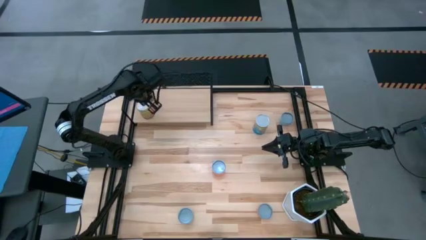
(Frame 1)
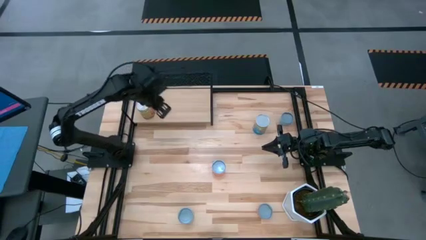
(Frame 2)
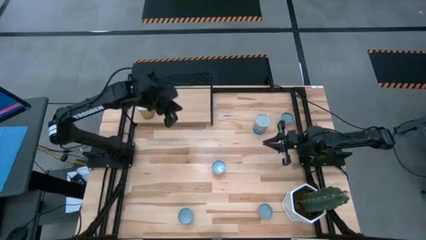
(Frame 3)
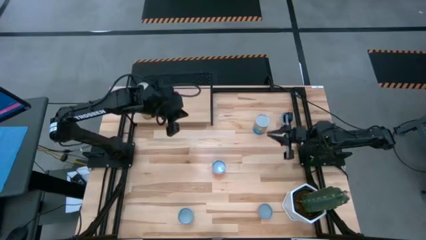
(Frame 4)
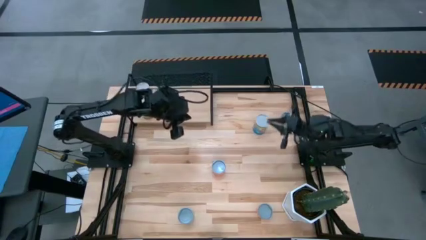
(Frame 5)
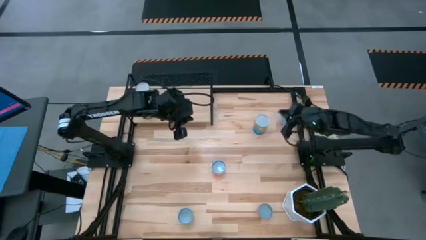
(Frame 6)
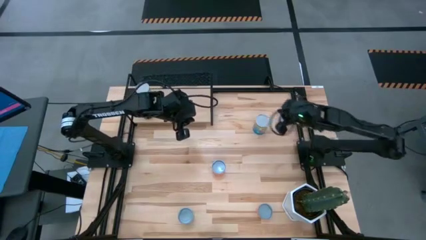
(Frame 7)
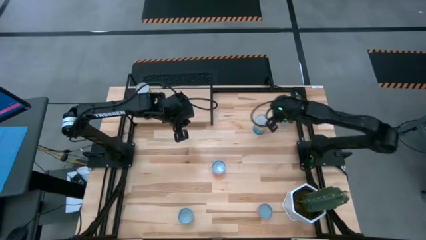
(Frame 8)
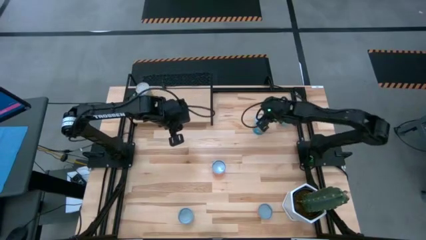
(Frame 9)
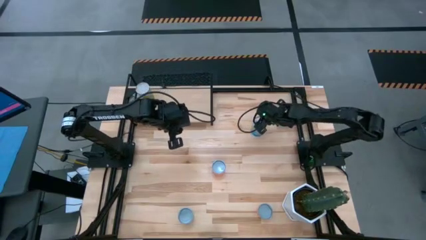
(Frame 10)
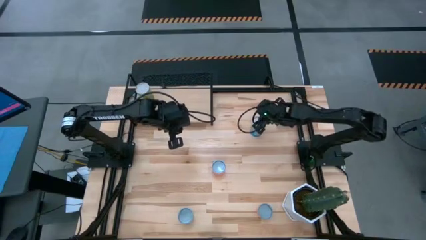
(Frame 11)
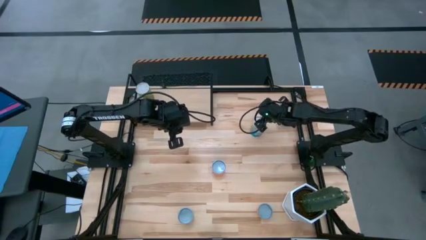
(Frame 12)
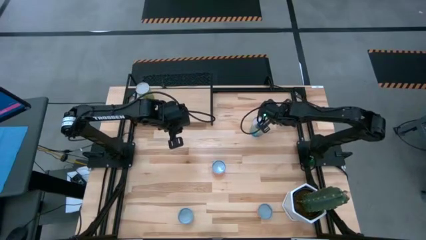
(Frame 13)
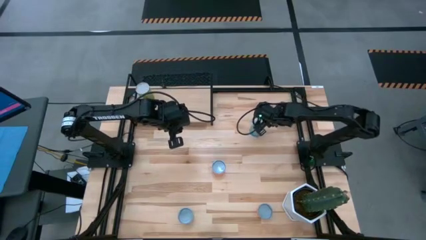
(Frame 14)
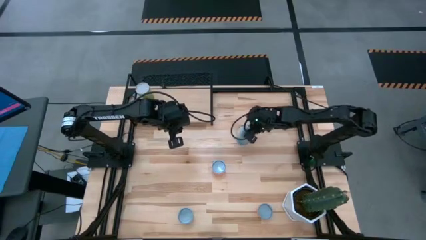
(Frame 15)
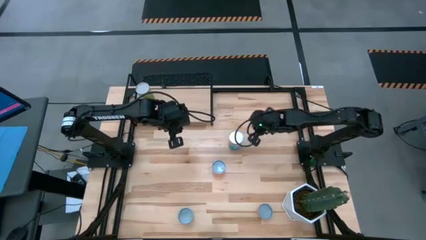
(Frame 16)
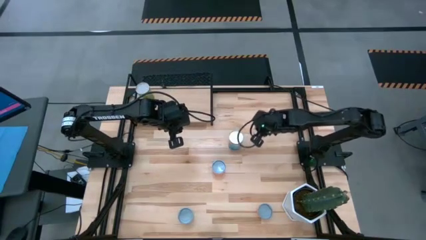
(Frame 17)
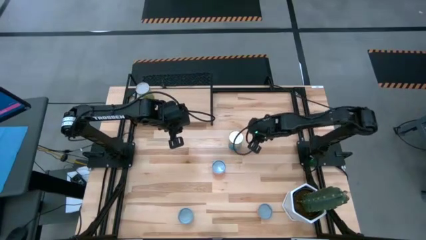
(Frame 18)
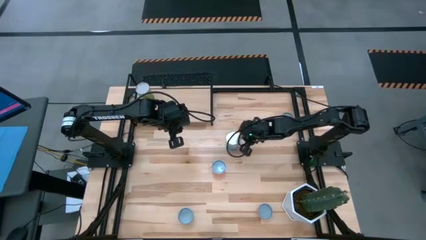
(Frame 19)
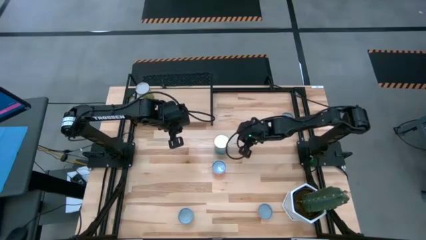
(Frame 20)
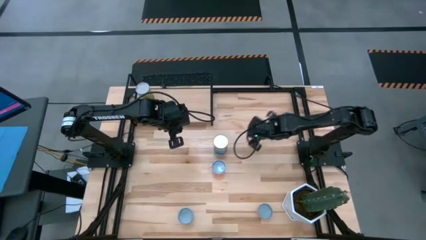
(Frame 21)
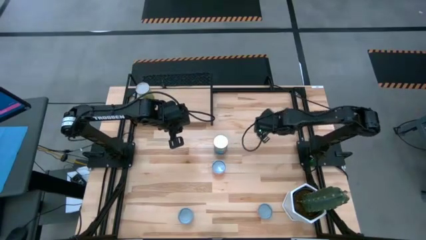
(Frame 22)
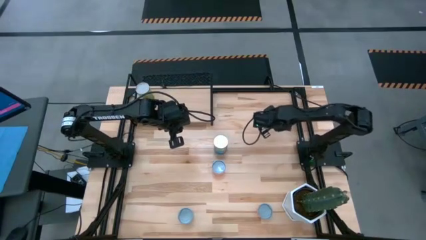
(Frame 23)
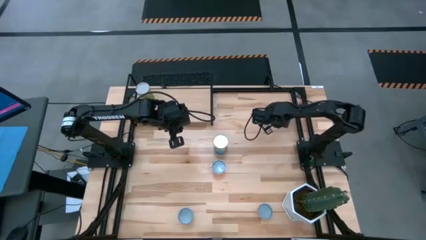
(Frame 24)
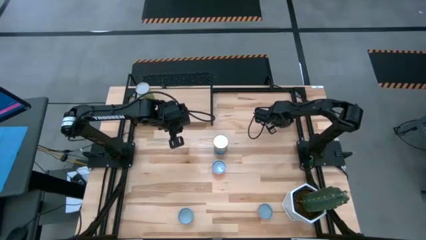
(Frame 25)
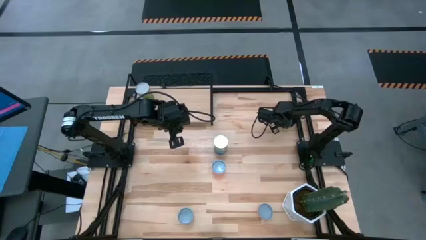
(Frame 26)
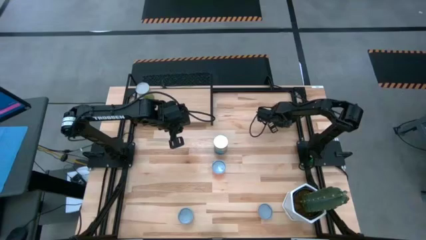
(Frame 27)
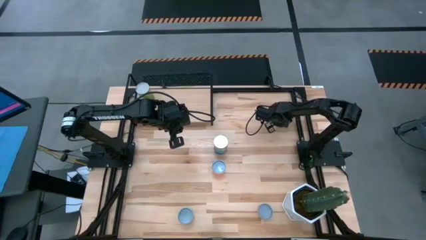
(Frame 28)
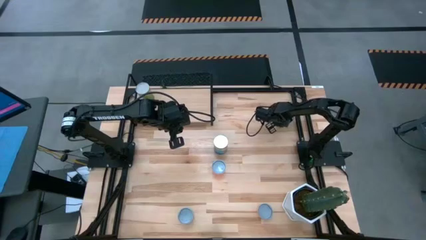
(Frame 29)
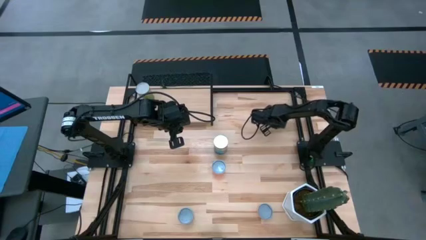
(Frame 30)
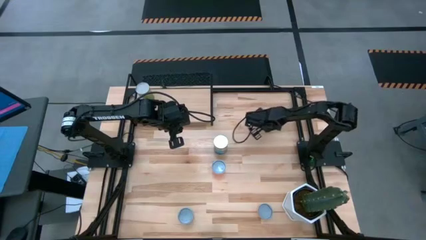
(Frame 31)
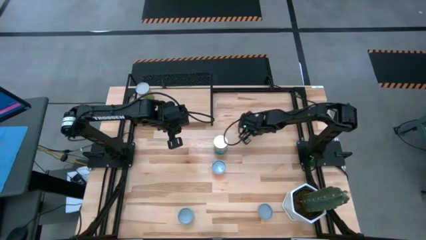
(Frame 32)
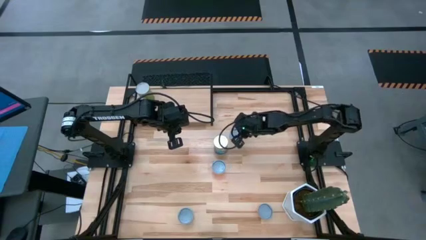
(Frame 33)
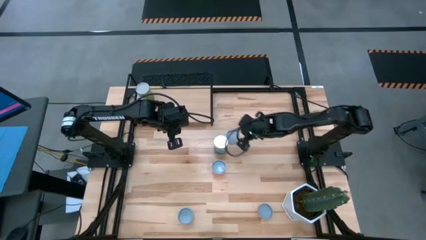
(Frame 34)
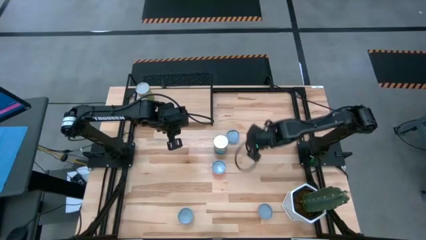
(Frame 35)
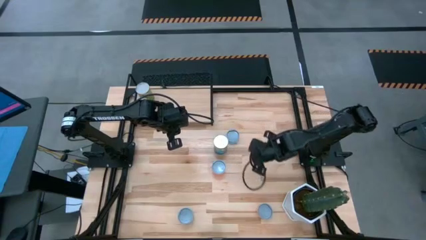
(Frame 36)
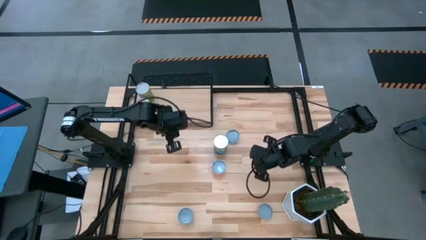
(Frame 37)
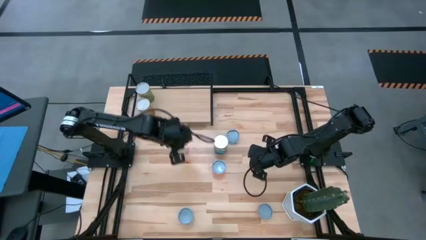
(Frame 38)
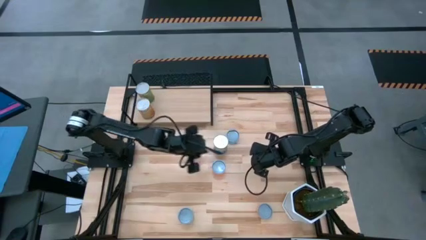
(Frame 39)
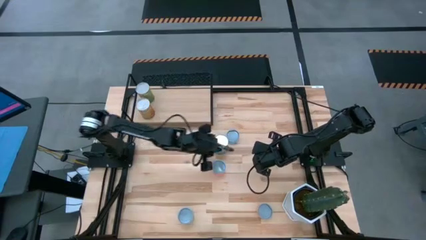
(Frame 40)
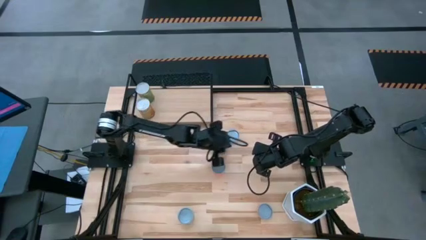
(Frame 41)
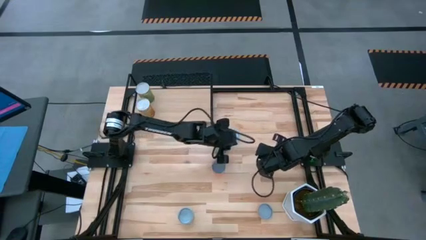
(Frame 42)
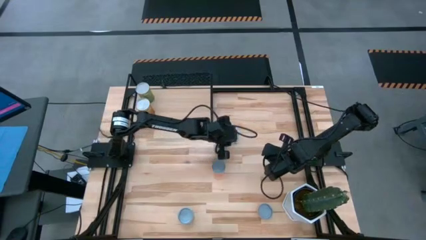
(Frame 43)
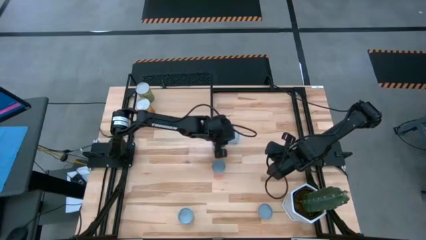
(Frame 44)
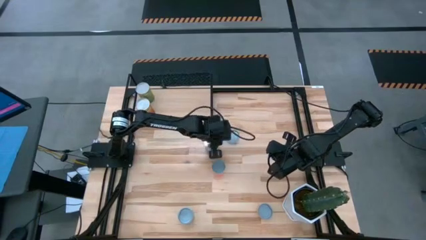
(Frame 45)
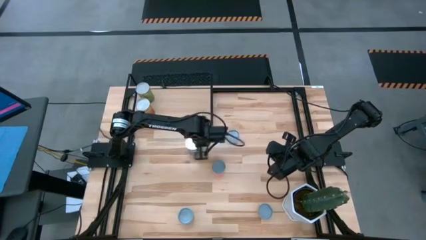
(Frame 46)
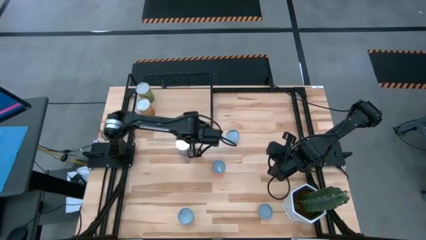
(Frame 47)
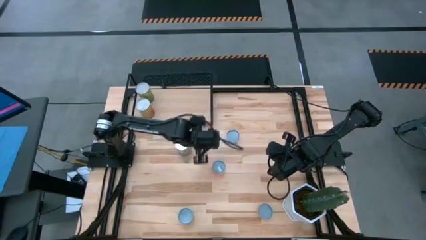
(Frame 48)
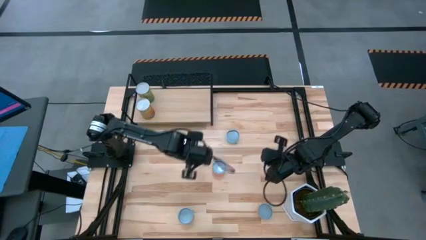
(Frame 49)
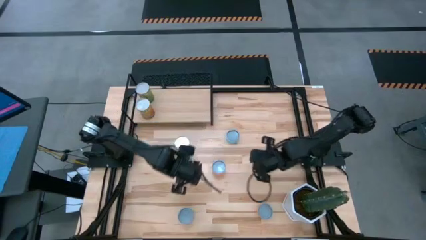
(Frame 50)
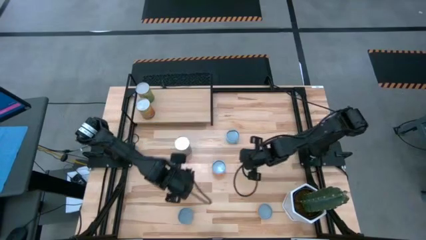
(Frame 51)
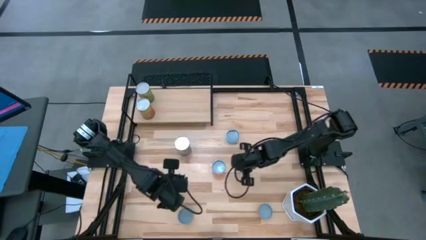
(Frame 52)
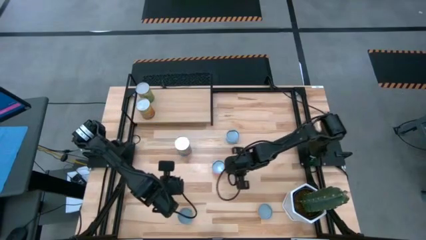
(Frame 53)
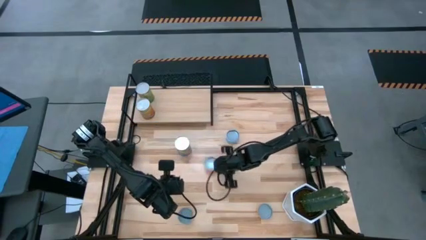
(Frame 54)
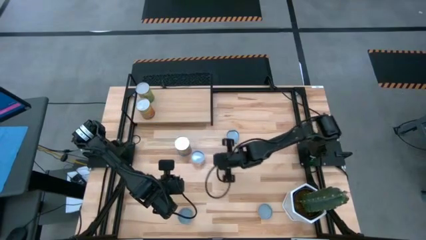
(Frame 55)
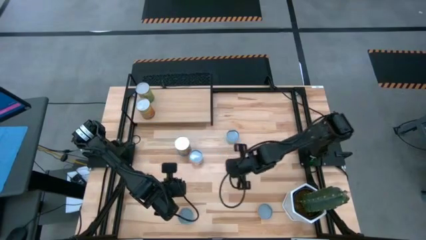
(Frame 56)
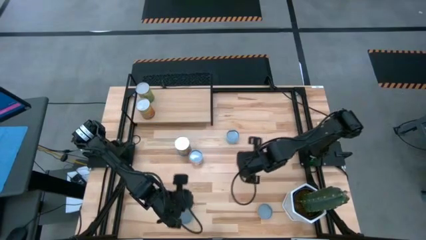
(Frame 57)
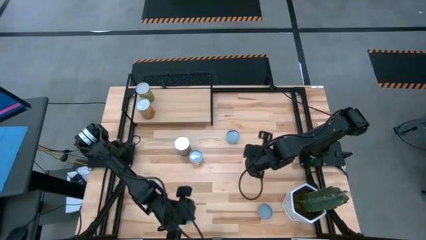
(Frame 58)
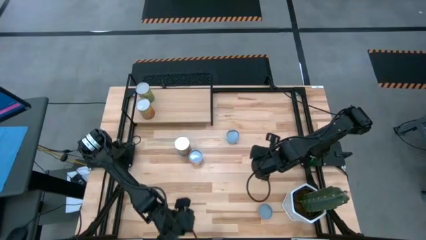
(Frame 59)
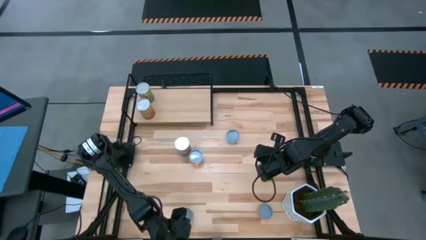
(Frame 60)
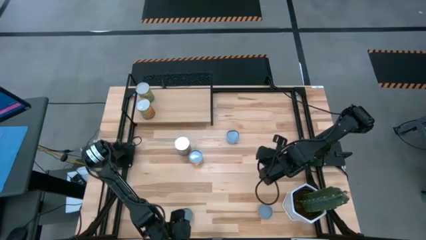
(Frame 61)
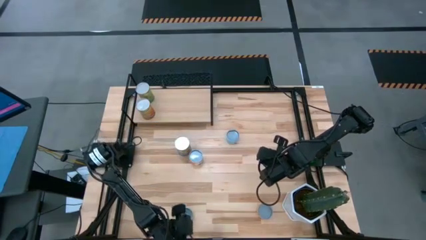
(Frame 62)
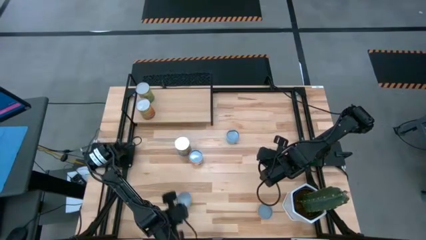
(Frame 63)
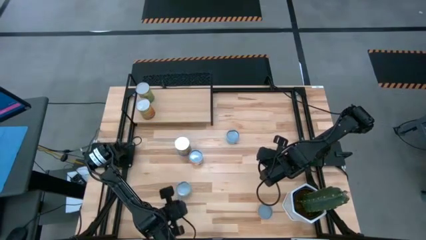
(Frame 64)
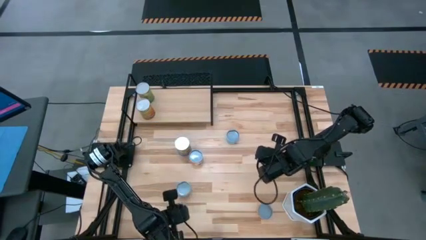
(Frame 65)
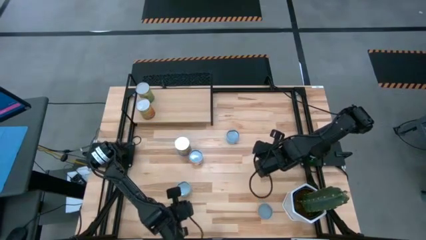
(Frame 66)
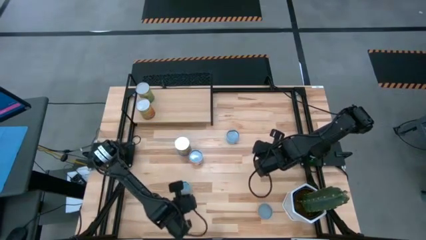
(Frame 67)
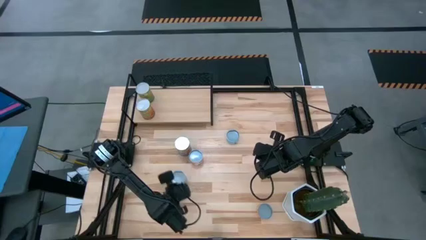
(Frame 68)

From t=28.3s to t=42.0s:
Task: Pick and place cans onto a shelf
Move the cans on the center of the table
